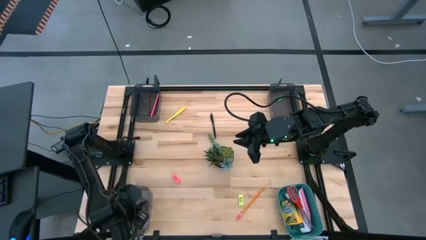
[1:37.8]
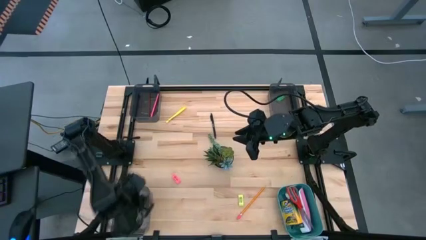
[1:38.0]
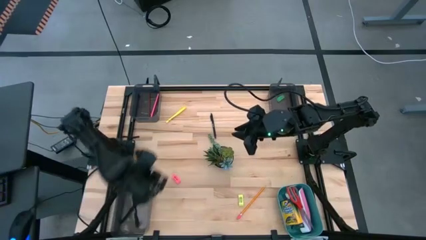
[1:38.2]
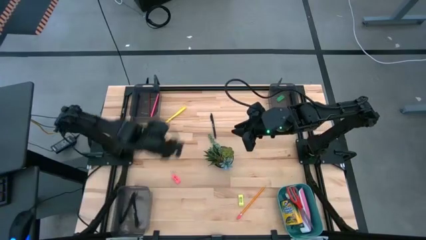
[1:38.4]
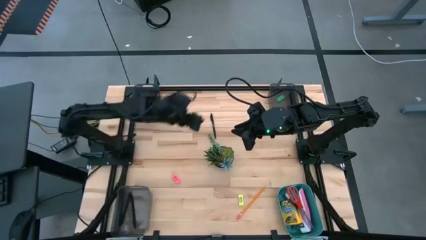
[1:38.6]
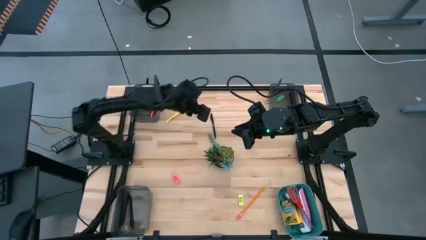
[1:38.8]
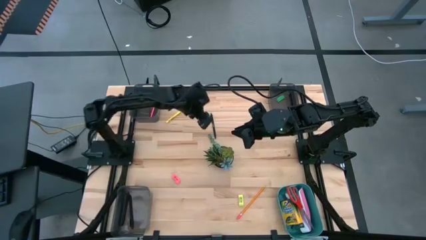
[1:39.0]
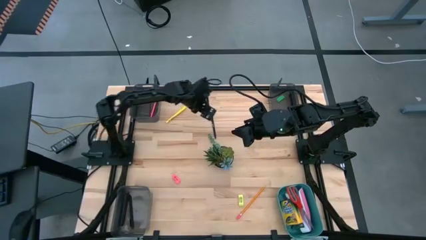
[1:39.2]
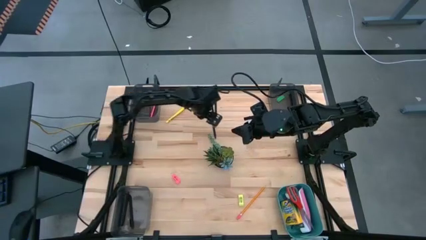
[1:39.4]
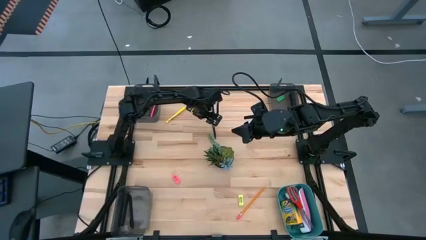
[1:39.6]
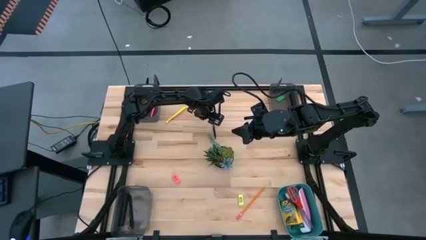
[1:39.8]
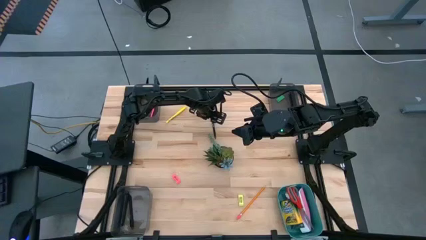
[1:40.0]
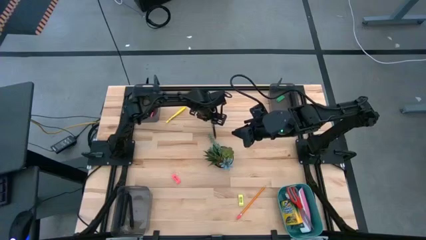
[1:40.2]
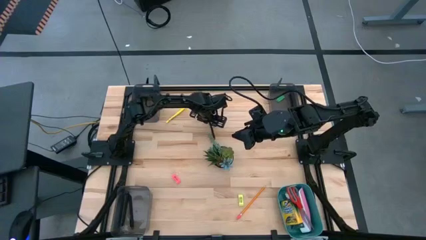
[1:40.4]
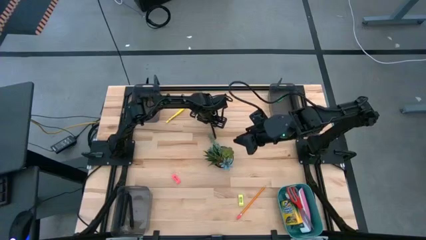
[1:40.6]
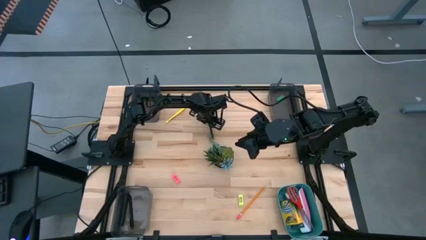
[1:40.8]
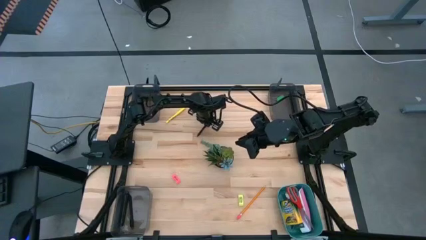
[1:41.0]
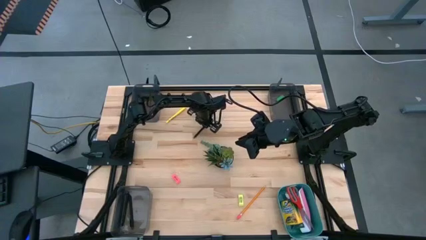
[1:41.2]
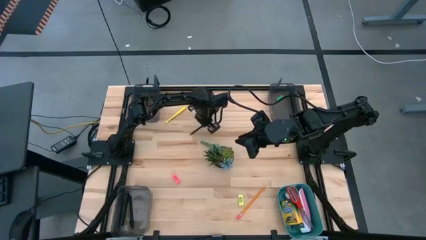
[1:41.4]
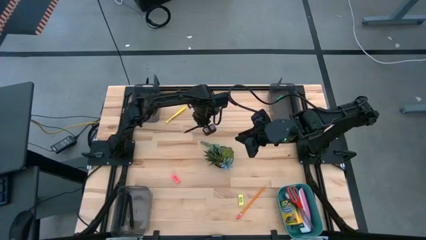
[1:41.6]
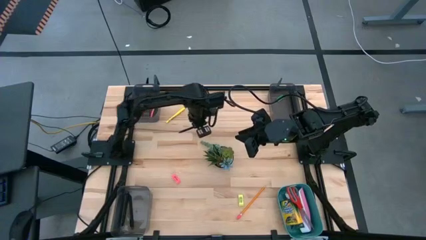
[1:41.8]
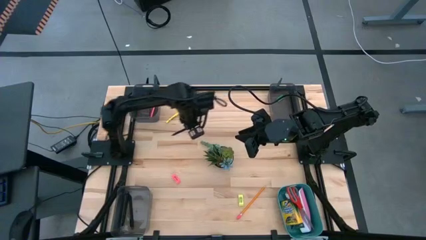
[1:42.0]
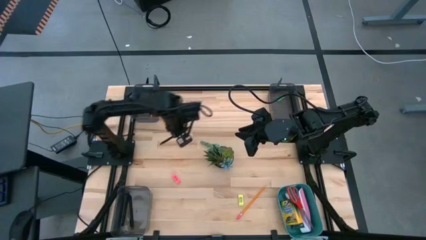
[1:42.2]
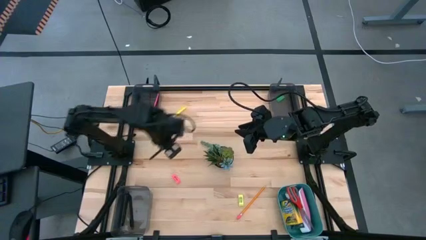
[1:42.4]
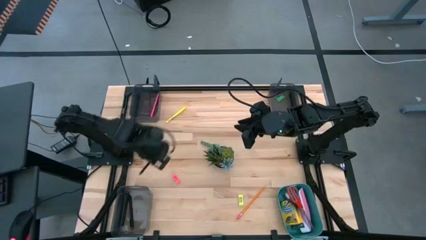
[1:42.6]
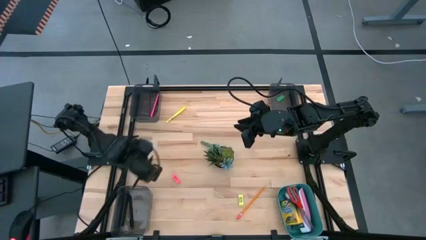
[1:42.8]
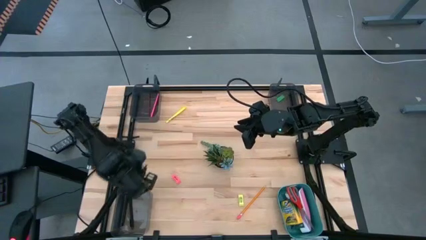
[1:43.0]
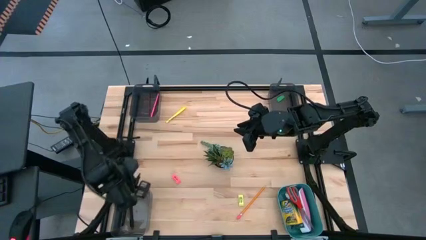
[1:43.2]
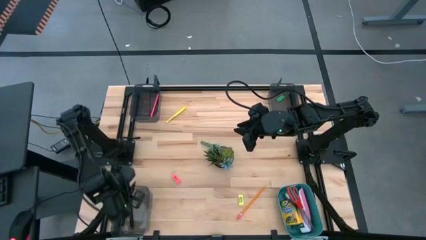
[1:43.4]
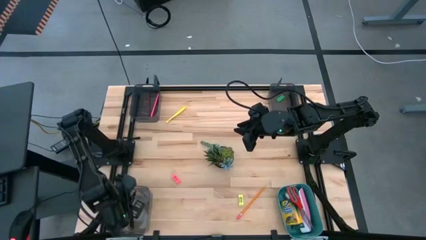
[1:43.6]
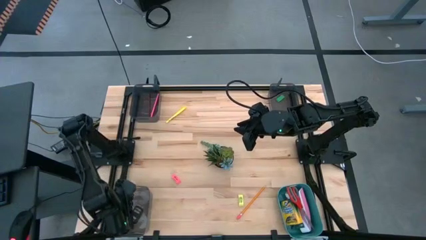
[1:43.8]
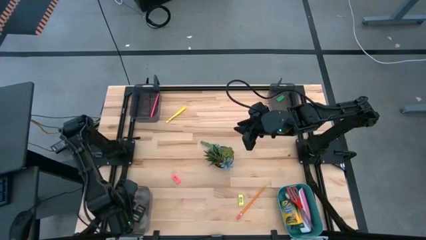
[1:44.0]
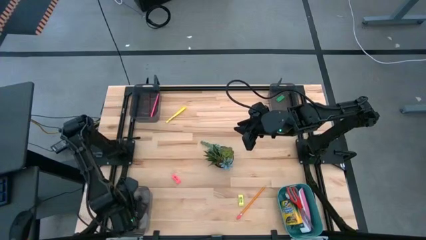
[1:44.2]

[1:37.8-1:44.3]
Task: Sort crayons/erasers/pens/pencils in bins
Put the black ballpen into the bottom left black bin

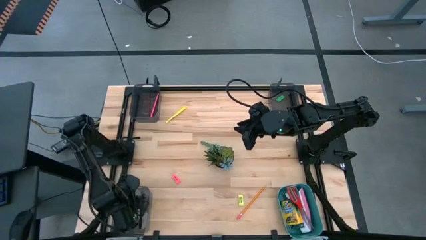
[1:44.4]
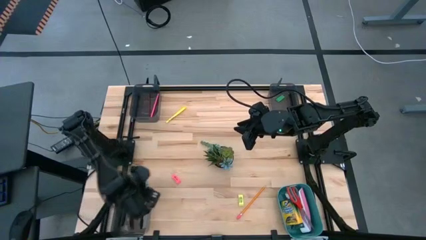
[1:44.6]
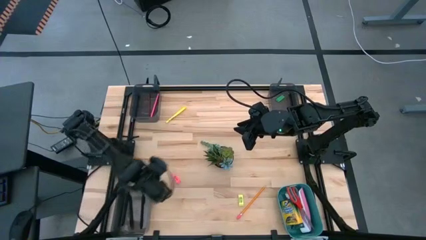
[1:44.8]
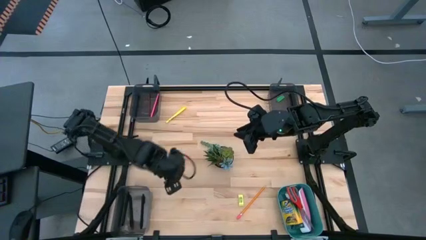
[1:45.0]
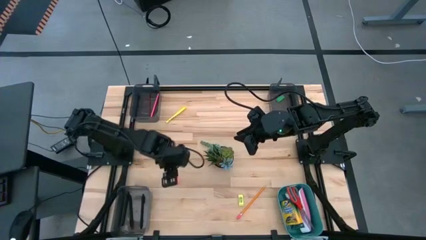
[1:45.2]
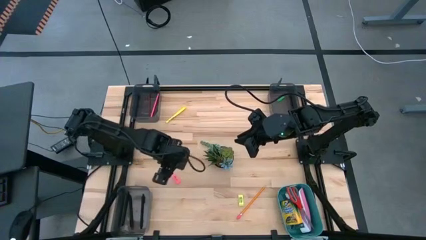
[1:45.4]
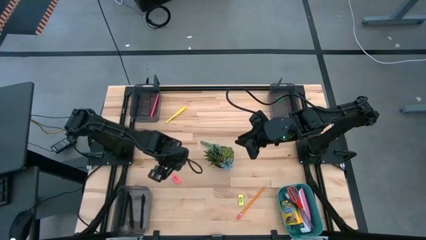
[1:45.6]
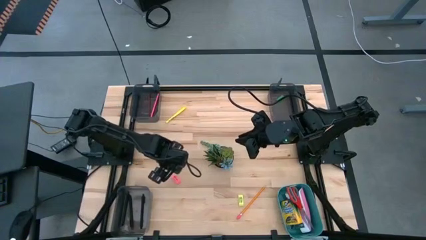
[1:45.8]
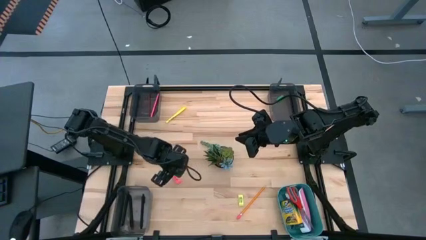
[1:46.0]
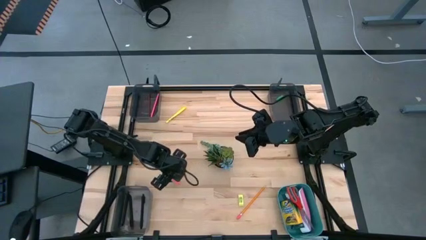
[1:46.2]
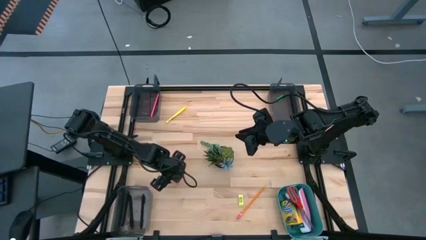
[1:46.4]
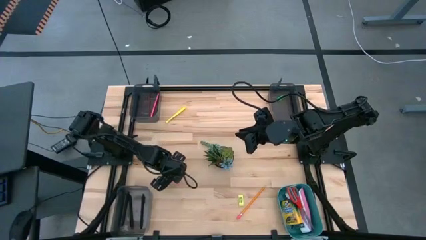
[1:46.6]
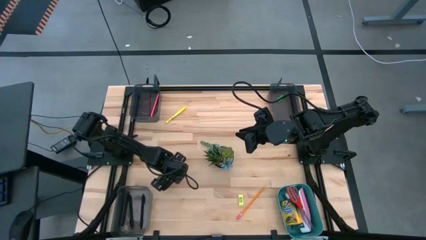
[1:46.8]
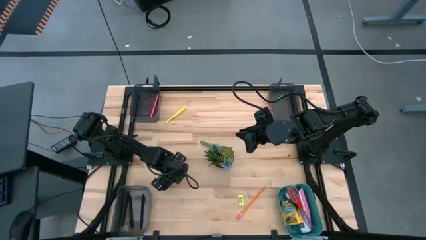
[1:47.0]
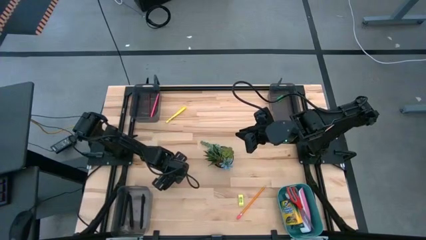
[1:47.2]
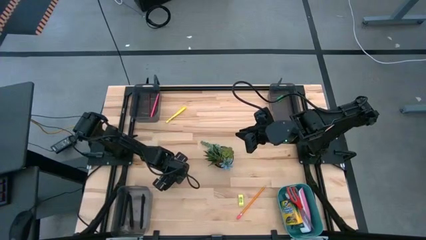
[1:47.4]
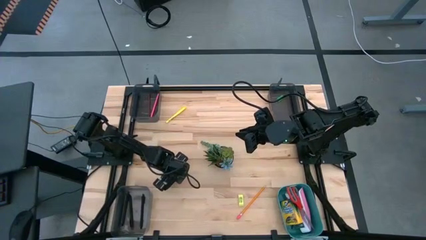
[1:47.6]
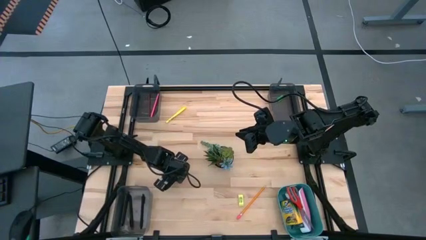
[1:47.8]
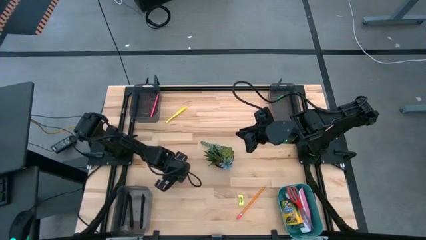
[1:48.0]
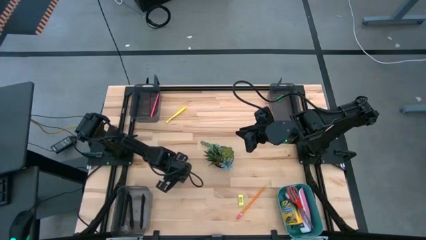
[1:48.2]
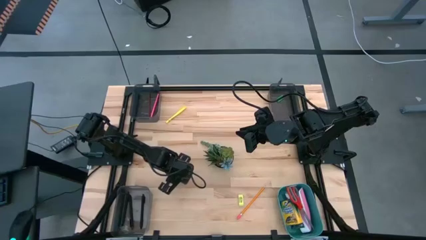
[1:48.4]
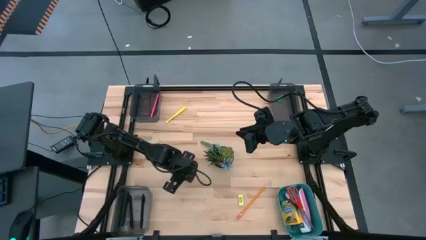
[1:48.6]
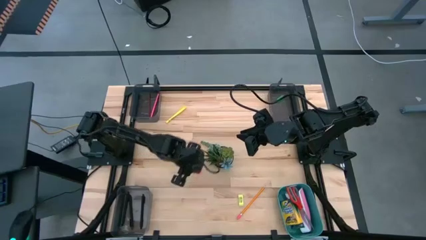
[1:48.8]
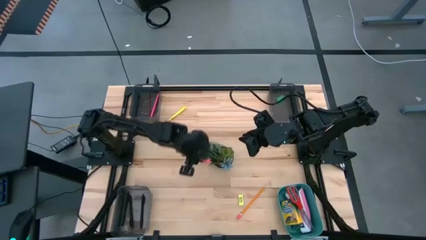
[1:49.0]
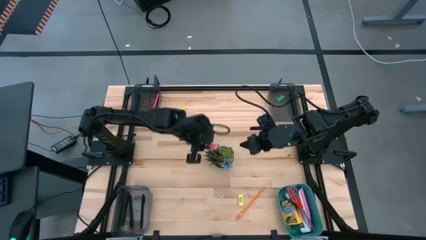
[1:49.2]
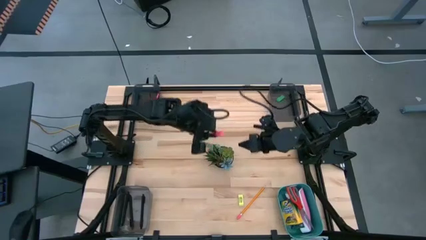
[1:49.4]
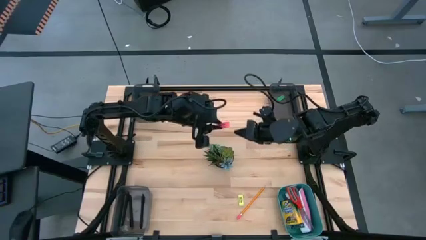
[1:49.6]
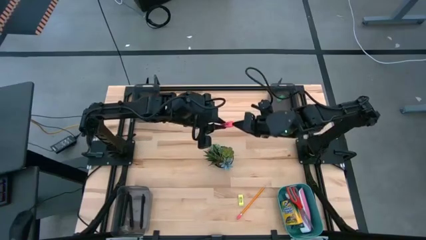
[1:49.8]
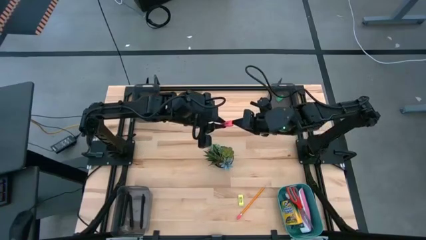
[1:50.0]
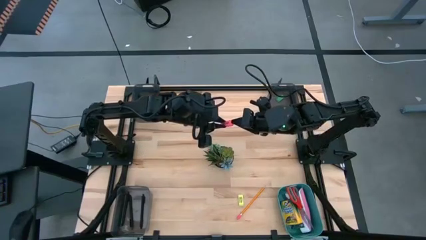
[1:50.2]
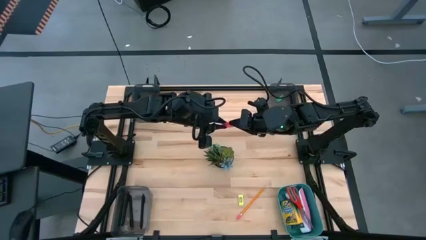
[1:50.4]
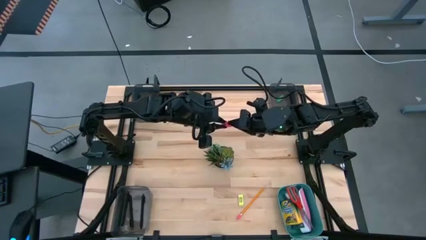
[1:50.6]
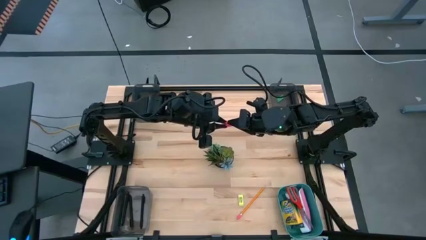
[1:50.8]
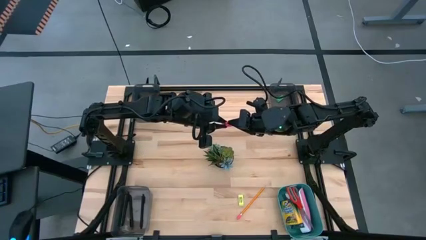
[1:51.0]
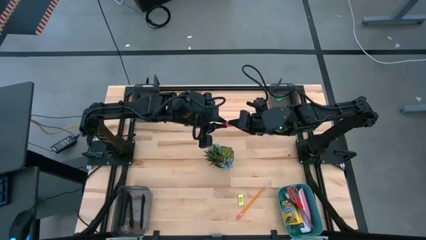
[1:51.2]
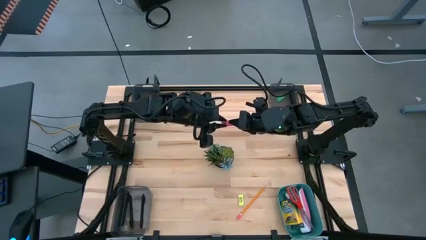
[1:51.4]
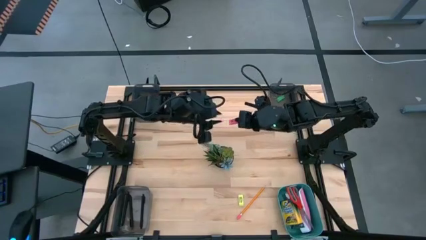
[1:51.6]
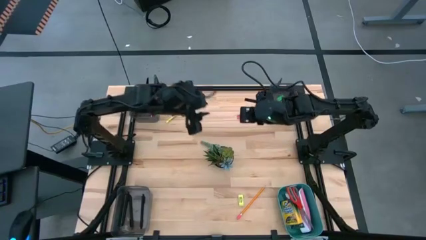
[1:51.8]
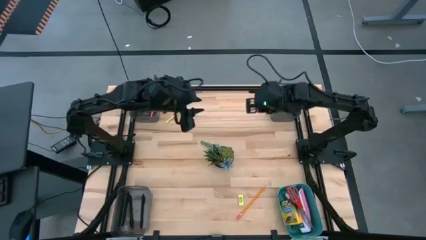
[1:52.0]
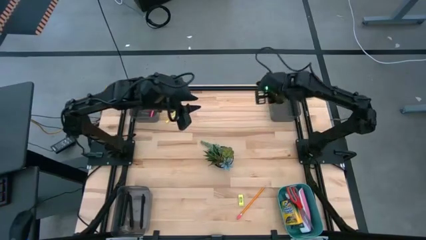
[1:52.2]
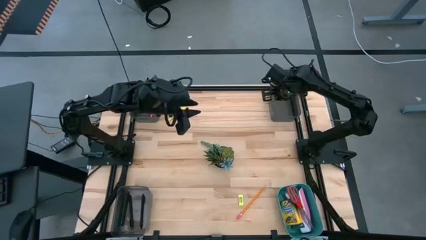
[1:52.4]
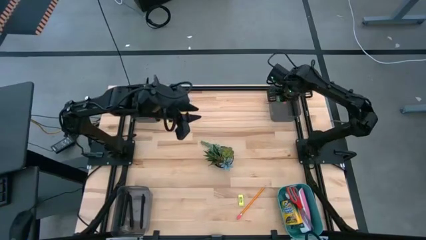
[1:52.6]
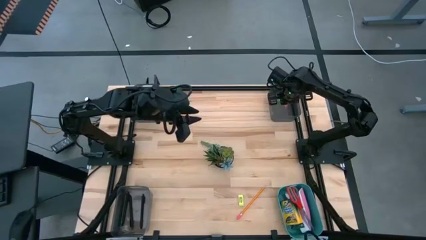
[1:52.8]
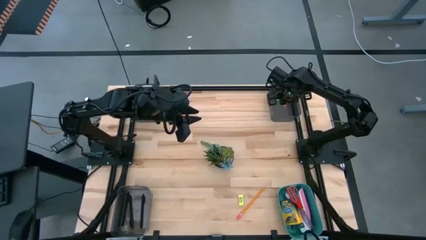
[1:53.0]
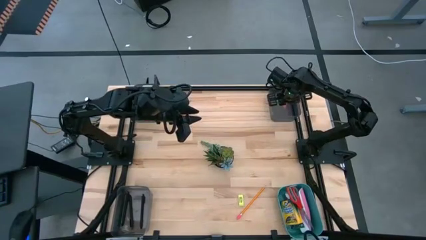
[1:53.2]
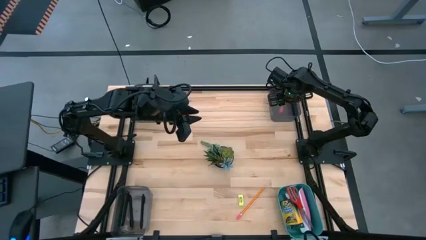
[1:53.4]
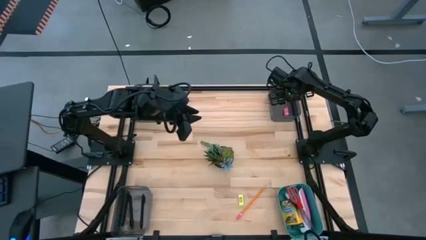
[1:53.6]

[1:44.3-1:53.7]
Put the pink eraser into the top right black bin
